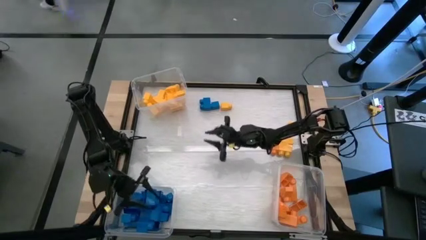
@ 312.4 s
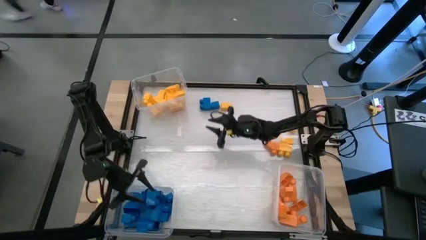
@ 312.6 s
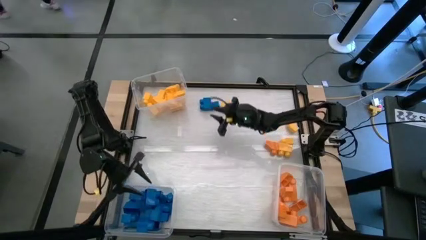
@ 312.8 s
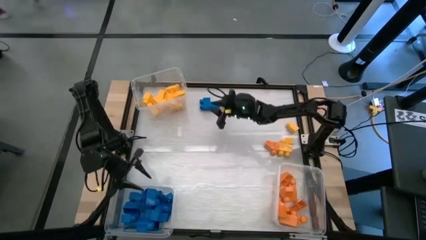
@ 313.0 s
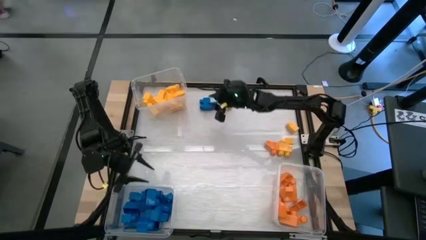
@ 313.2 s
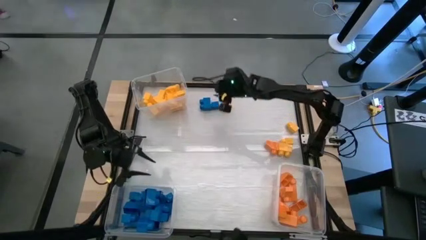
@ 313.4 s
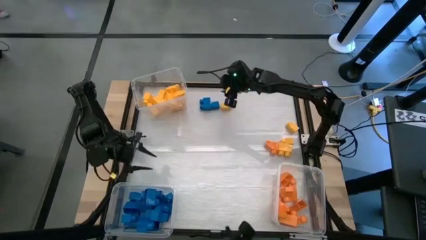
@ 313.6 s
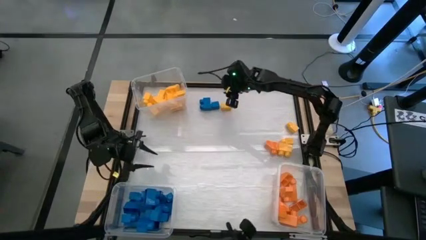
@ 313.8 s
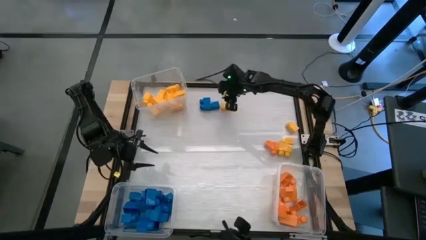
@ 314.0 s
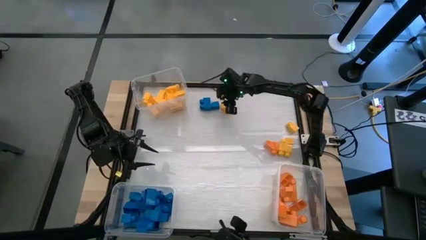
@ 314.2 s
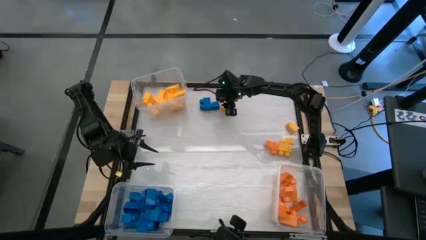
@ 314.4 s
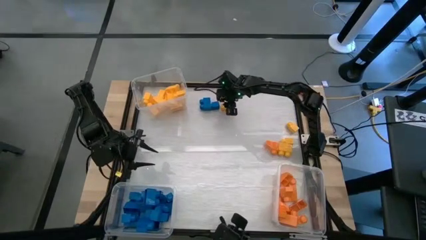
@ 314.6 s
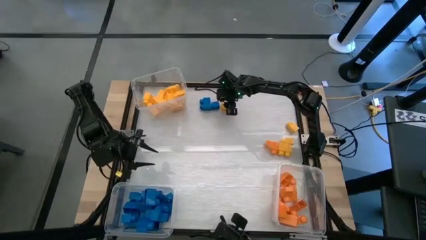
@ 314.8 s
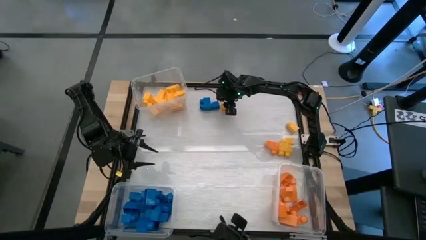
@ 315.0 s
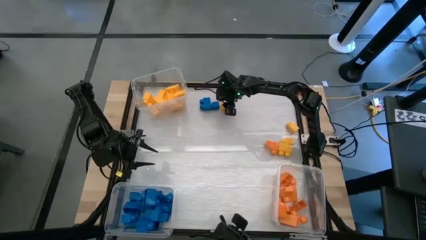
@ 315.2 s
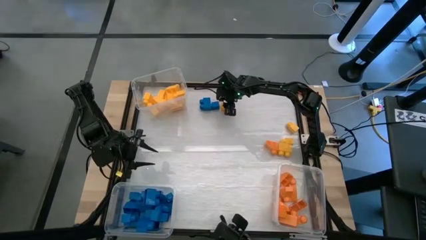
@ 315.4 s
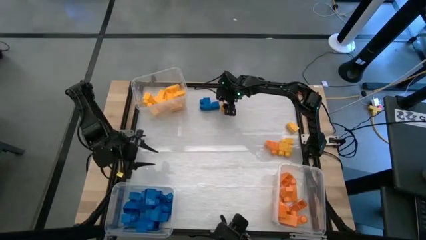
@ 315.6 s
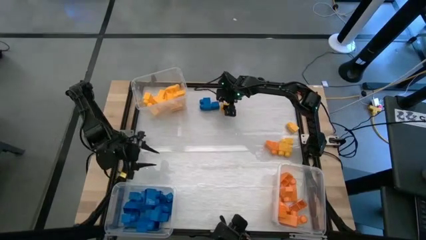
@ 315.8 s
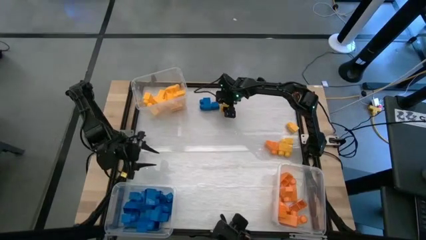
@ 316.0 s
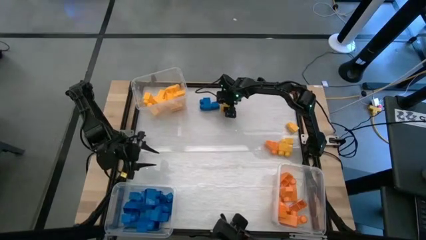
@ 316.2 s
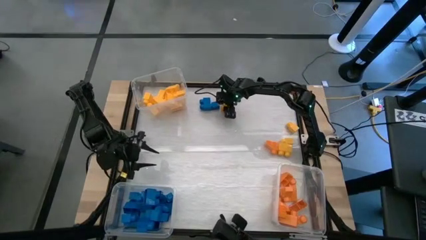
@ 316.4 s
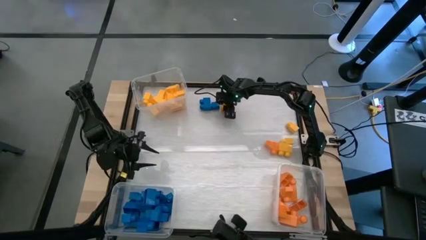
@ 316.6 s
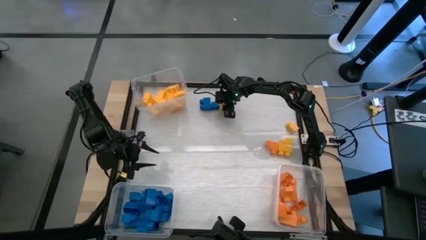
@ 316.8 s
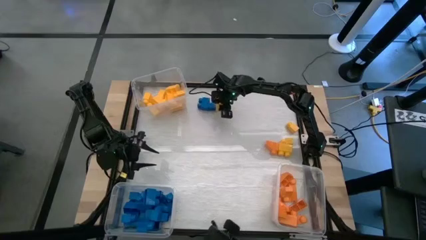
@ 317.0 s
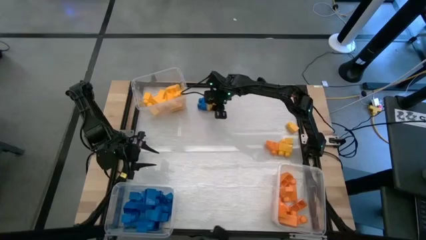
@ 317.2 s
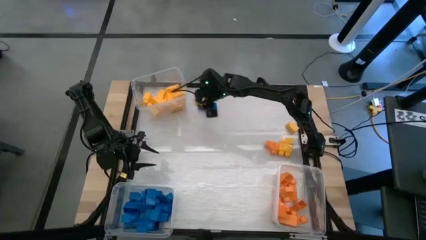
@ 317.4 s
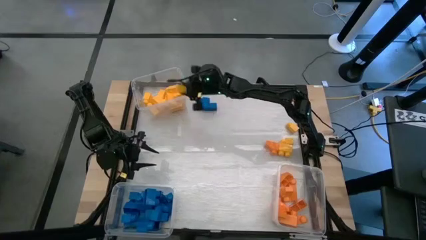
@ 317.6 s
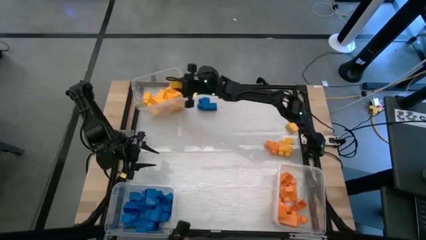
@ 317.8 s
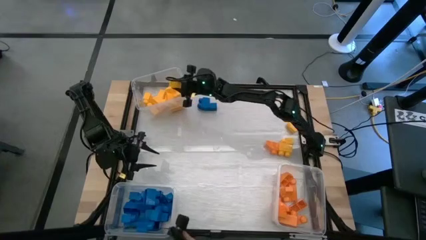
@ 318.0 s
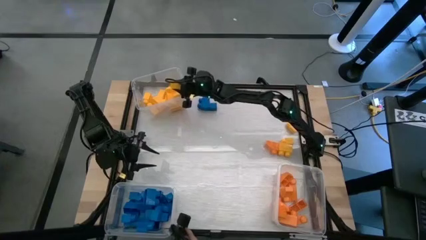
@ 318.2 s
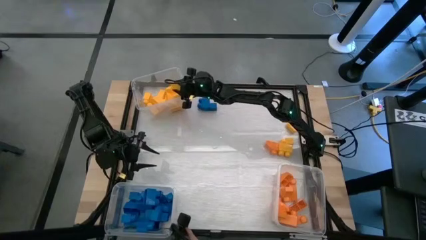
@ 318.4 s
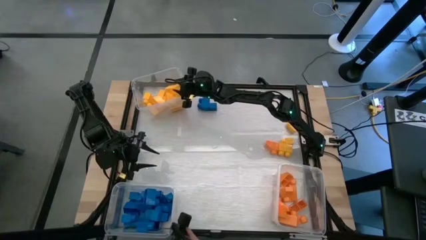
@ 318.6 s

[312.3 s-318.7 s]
Task: Sort blocks
Put the yellow game piece into the top transparent bin

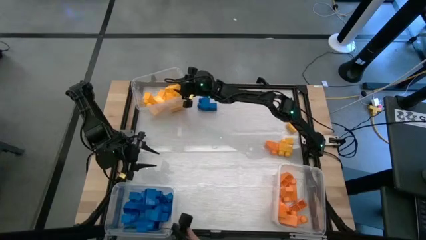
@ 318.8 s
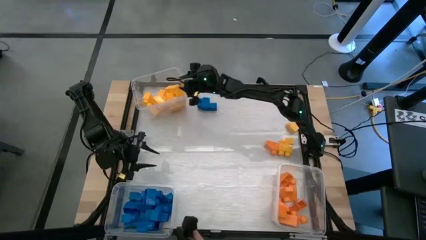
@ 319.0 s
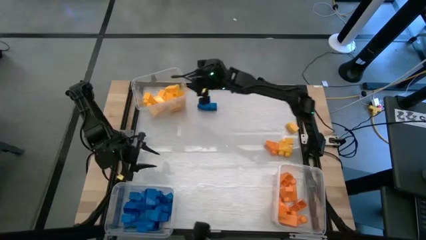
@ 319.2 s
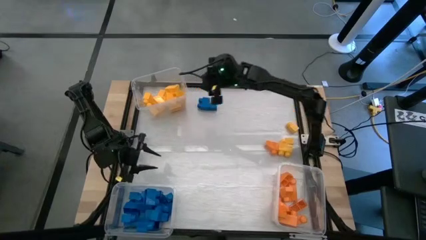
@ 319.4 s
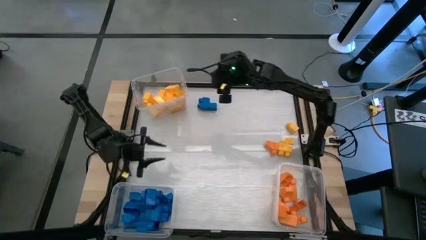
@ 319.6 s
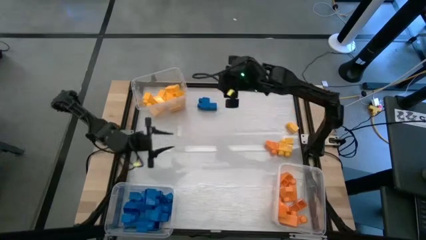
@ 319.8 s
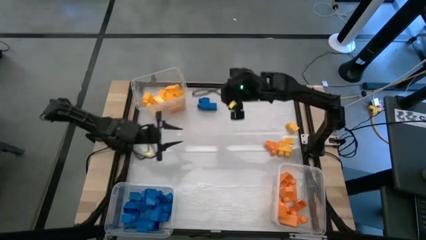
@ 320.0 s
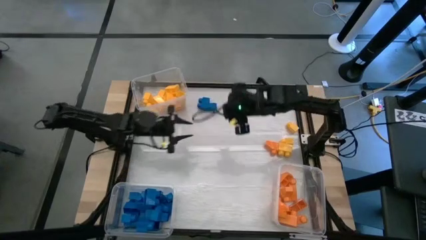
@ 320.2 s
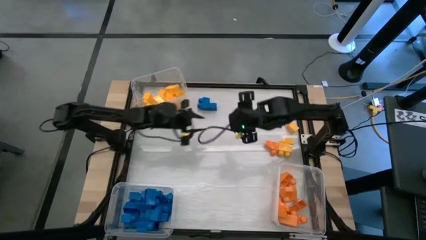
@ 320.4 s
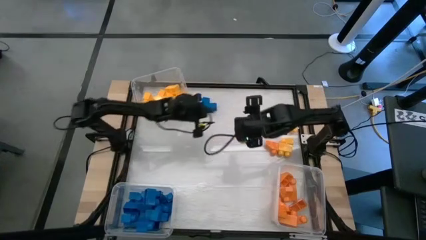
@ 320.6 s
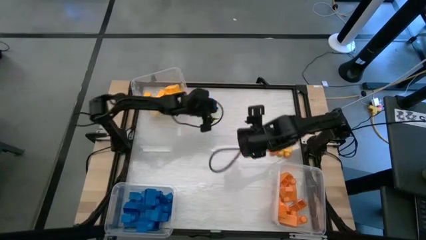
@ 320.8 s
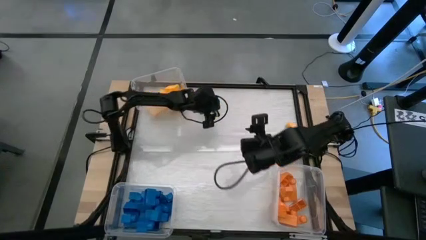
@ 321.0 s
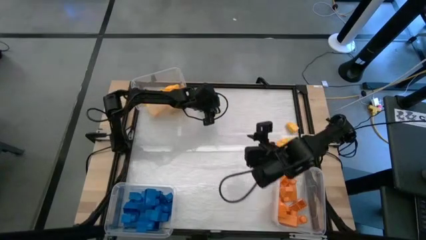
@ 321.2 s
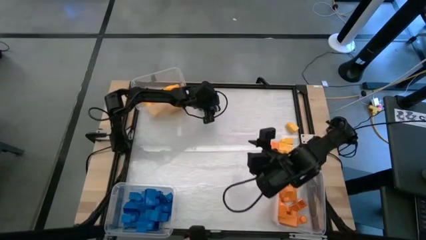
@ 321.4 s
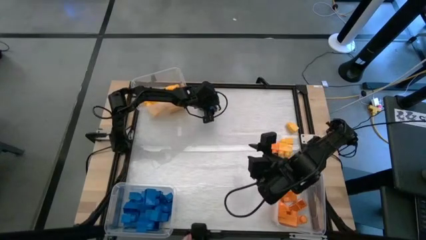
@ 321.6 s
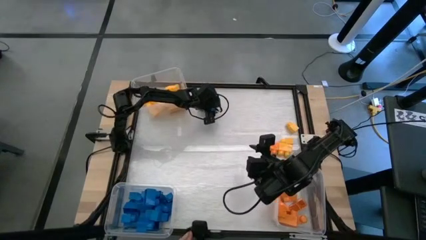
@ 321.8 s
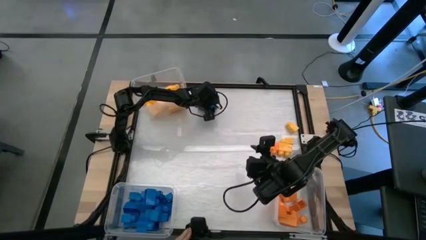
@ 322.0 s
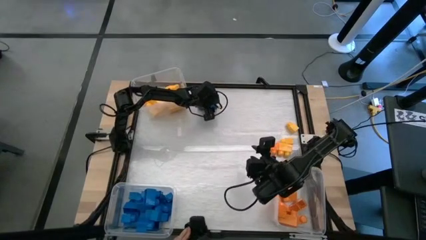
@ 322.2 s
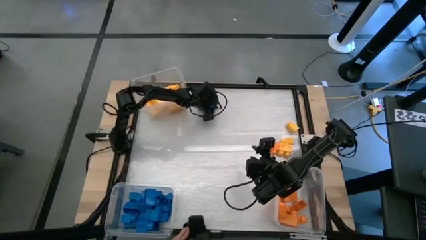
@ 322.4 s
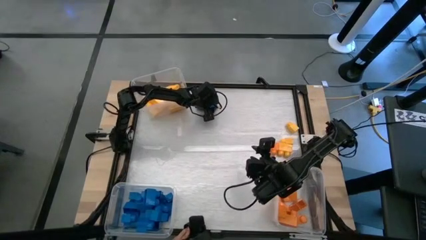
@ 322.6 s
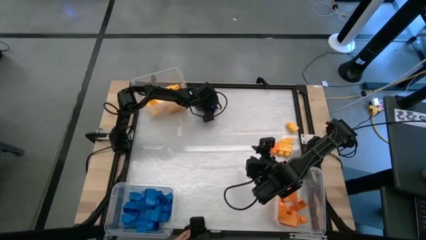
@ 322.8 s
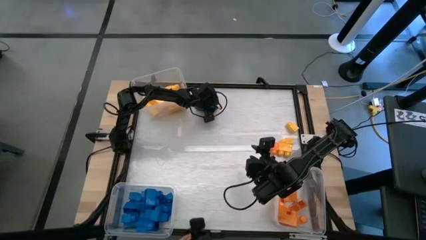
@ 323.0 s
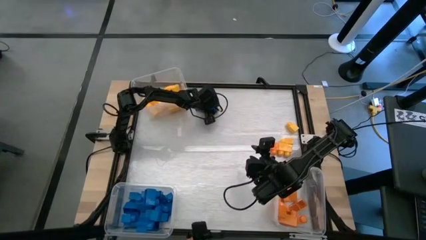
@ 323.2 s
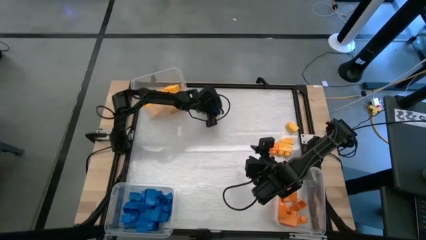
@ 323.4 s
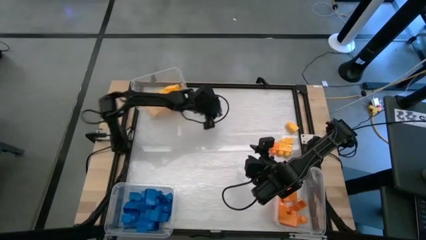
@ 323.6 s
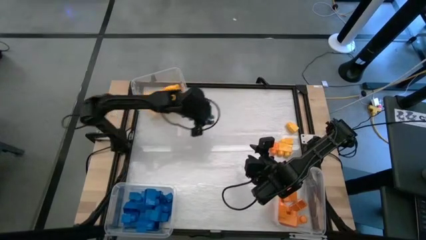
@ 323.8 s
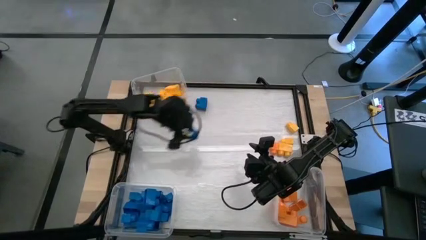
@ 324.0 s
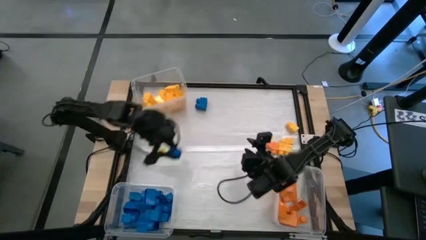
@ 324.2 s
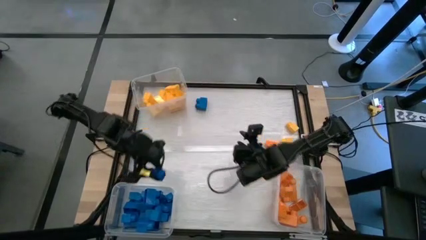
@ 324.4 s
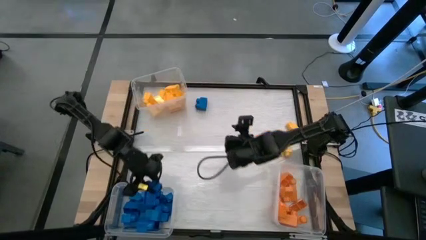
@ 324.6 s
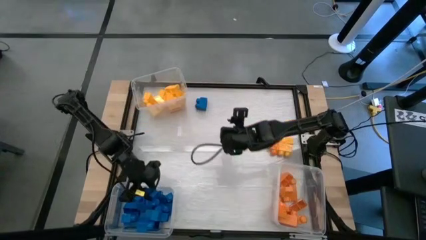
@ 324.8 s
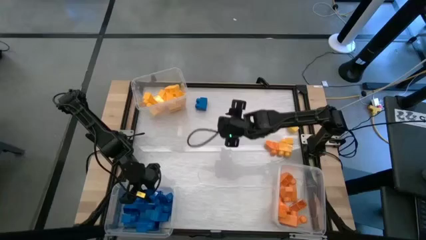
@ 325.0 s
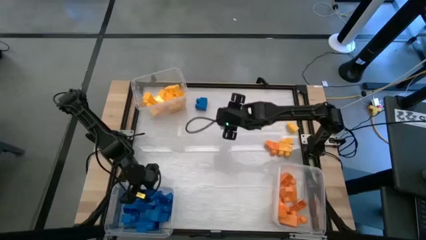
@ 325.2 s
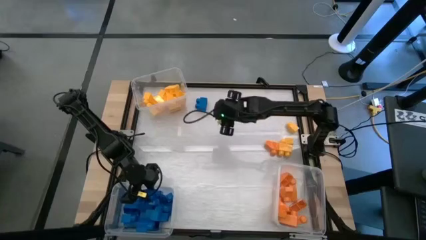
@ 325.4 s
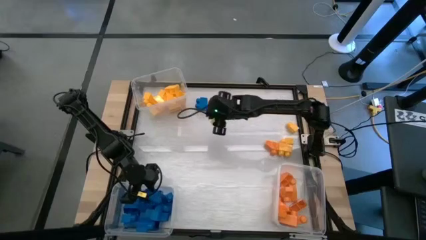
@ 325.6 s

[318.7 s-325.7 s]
Put the blue game piece into the bottom left transparent bin

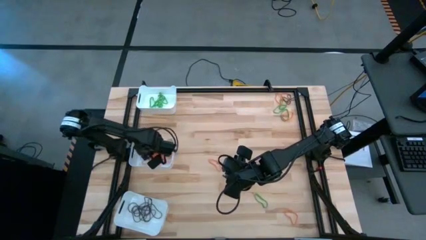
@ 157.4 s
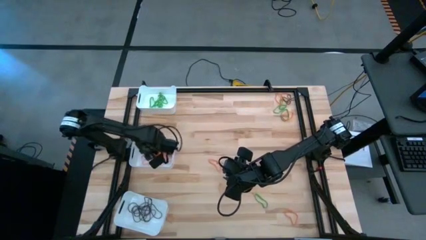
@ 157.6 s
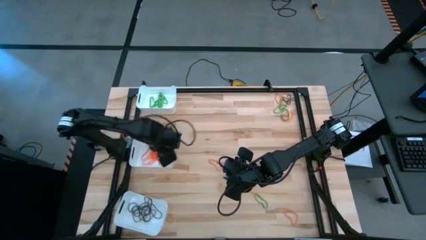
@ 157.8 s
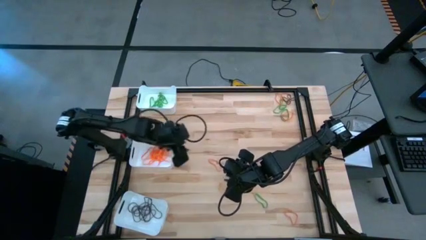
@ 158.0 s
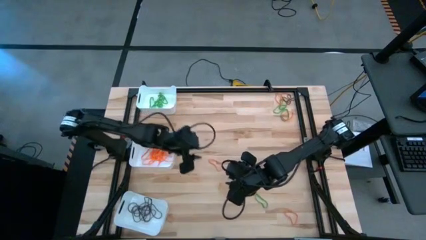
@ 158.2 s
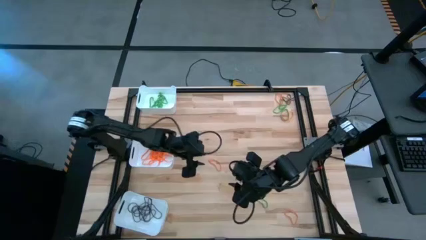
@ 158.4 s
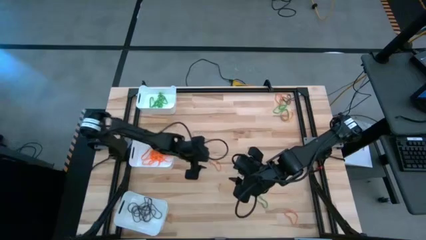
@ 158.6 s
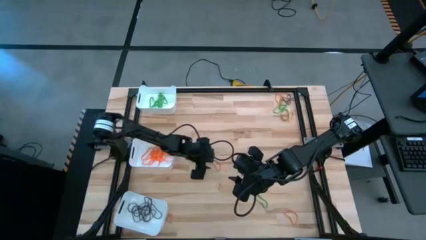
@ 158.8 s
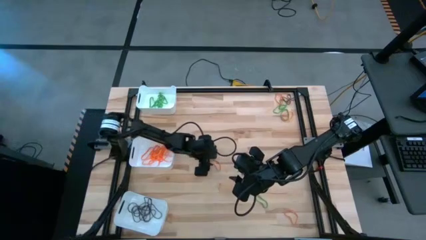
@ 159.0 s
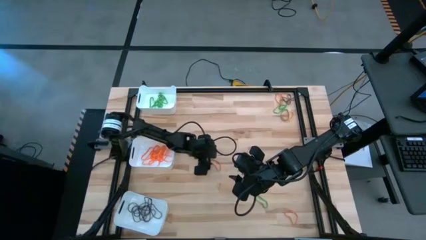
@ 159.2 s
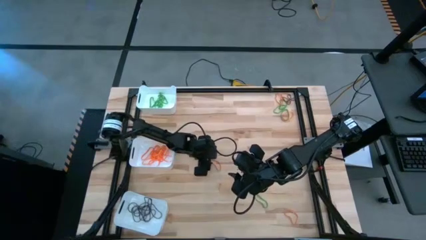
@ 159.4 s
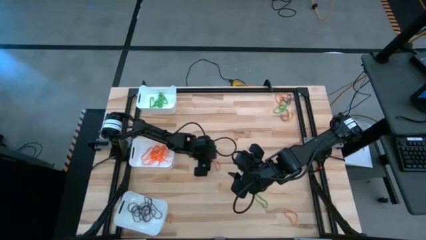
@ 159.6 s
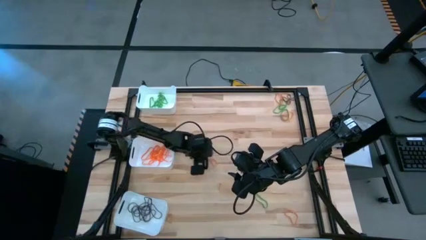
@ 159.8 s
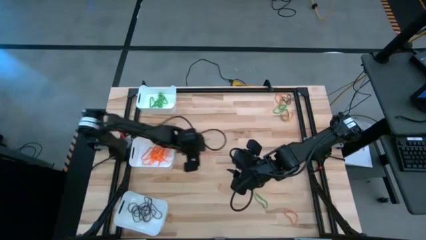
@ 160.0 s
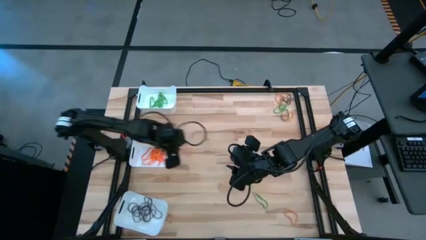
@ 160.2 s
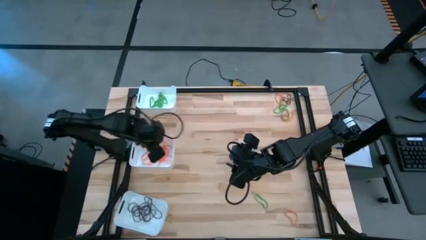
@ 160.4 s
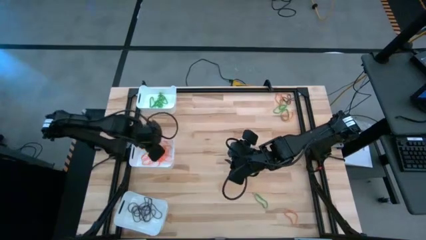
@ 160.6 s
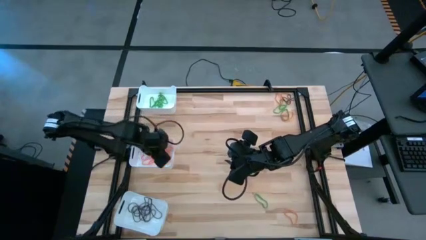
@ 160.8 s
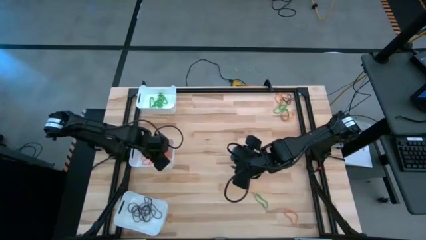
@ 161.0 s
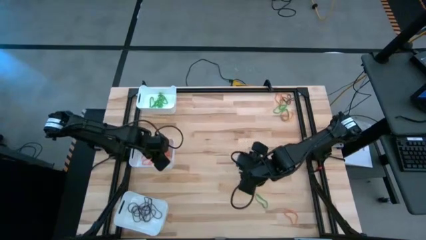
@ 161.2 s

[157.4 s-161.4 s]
Task: Sort rubber bands into baskets
Put the orange rubber band into the middle white bin
